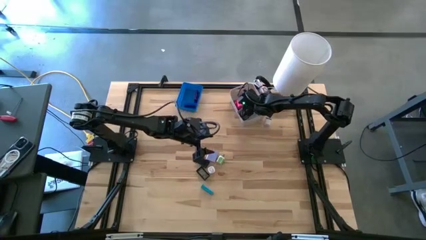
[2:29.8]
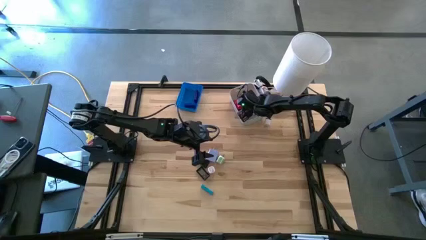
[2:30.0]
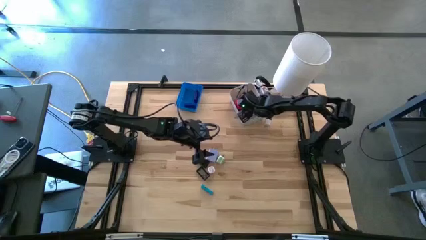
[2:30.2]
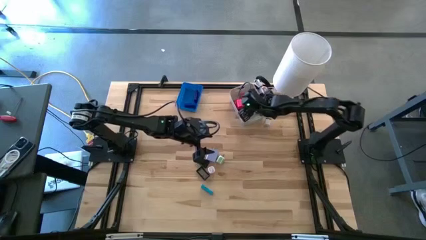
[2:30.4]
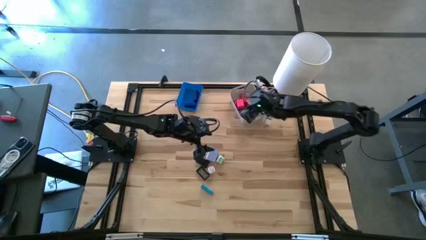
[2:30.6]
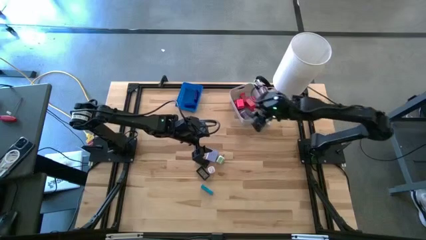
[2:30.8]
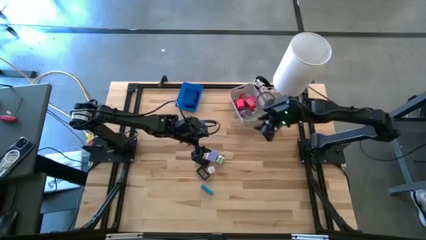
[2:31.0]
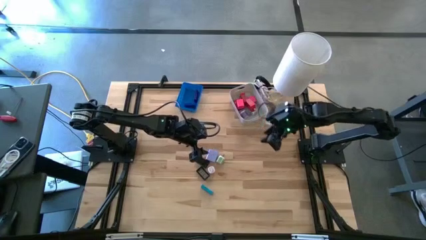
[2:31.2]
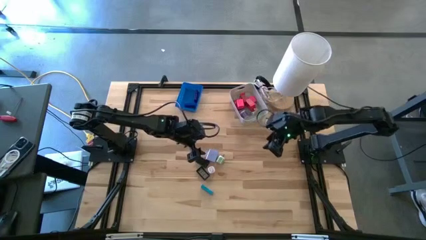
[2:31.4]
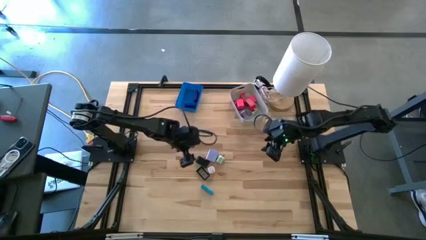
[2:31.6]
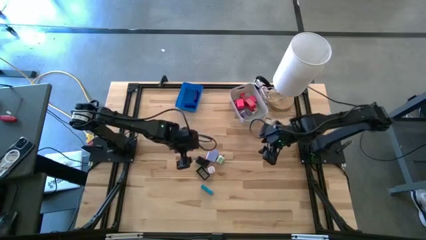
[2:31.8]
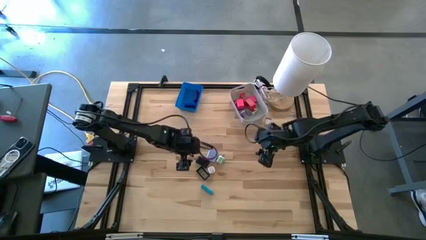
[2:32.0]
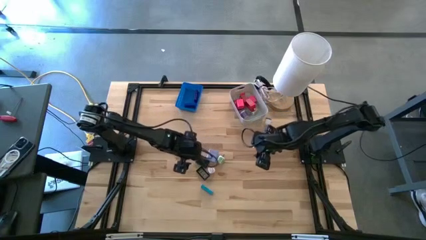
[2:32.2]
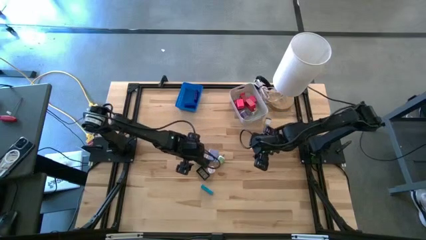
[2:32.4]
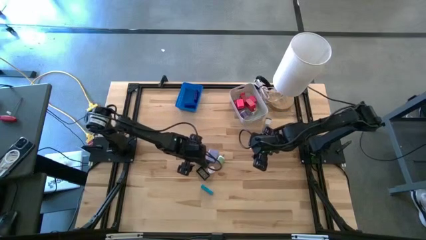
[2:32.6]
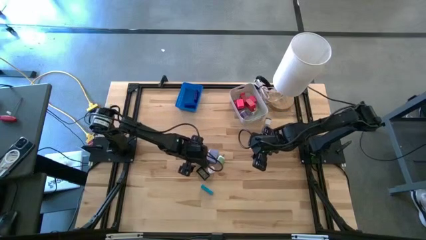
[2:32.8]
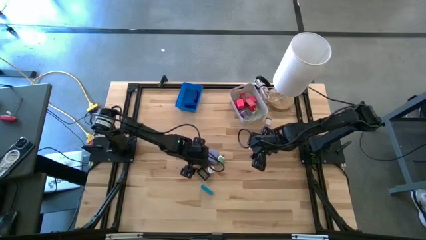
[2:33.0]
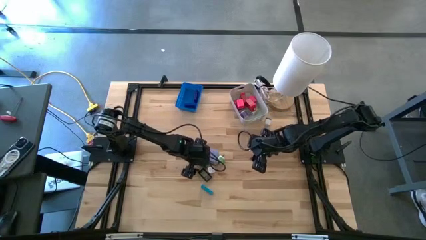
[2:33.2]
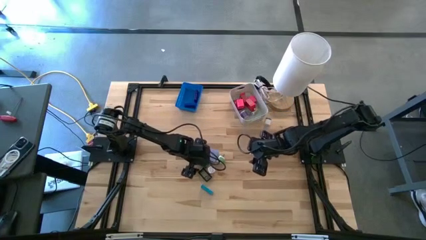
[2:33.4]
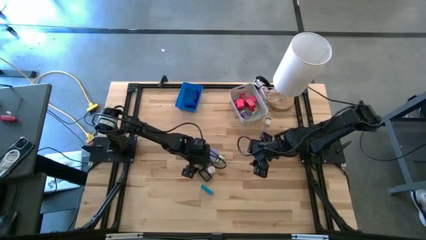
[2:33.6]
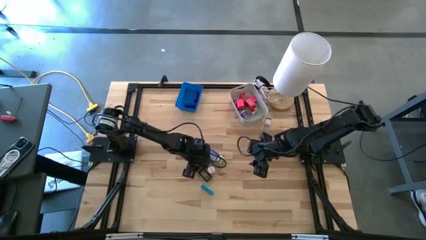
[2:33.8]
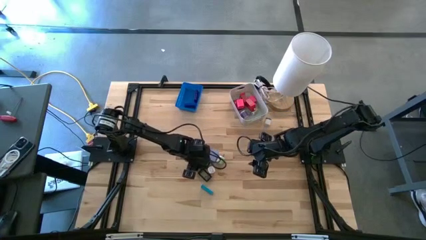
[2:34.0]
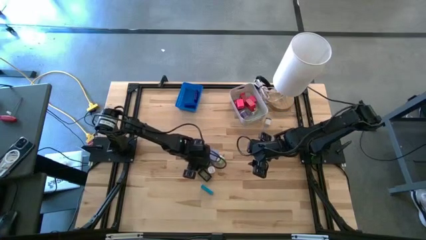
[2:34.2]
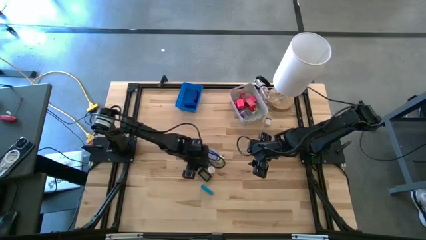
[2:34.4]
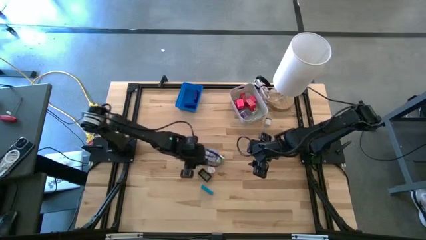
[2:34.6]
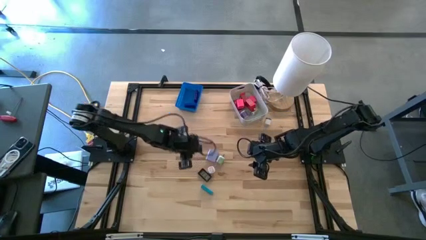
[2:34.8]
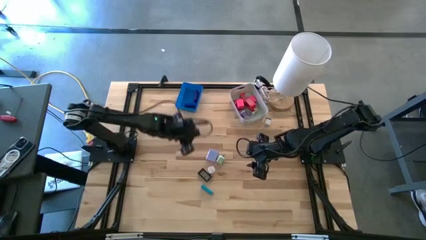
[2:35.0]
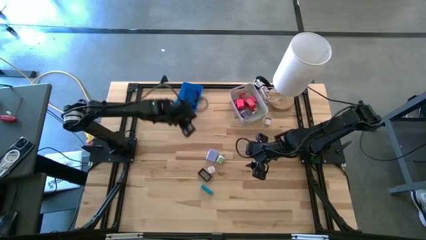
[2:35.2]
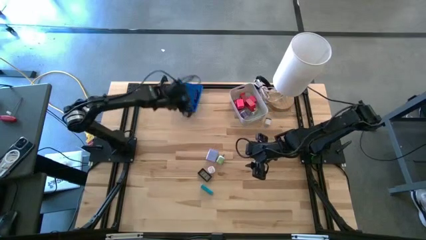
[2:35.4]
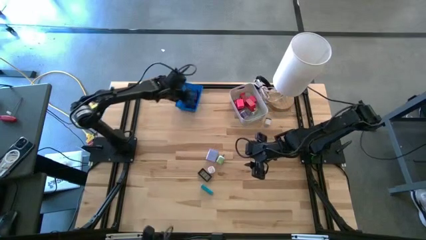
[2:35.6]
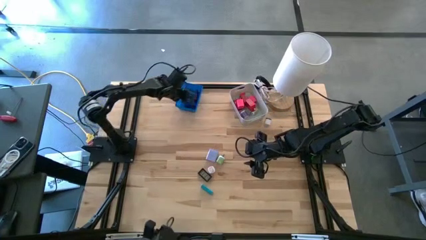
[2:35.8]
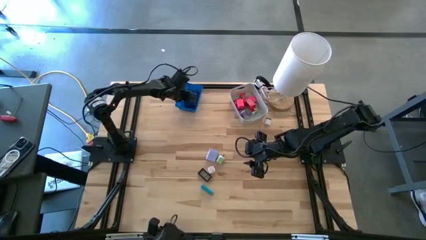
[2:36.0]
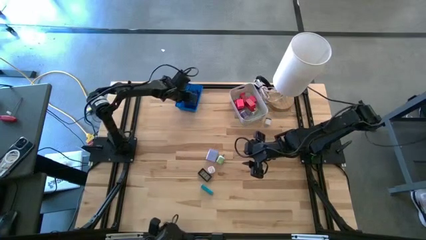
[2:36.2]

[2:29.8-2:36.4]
Task: Pick & Place Office items
Put the top black digital timer into the blue bin

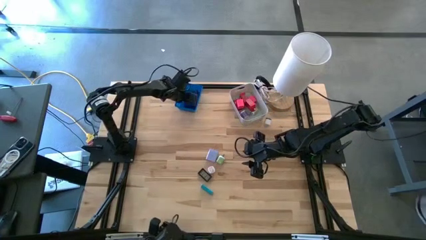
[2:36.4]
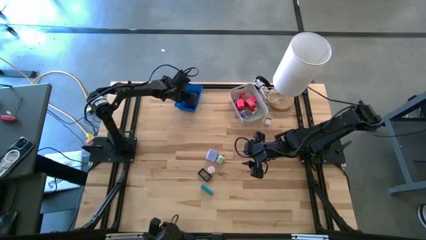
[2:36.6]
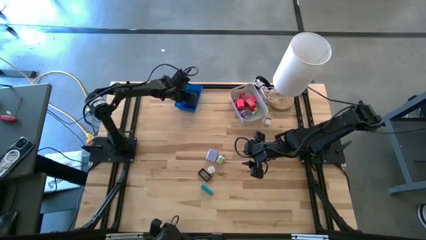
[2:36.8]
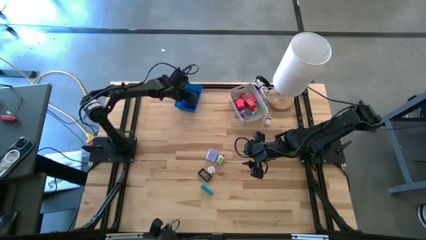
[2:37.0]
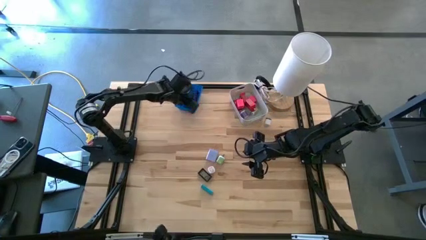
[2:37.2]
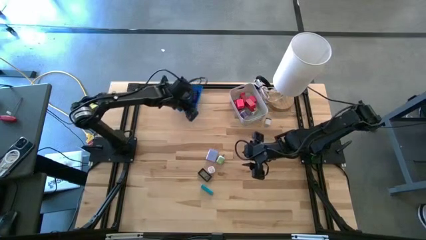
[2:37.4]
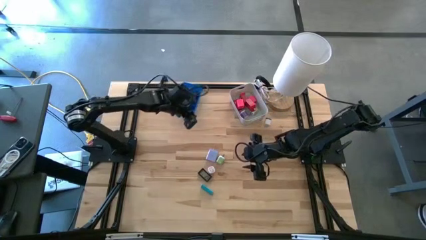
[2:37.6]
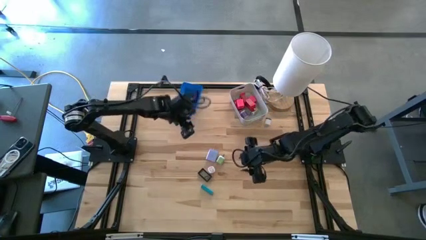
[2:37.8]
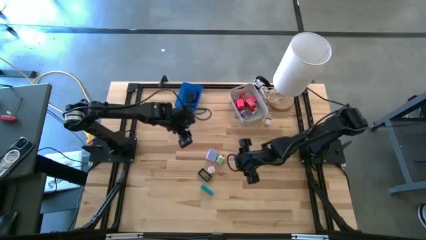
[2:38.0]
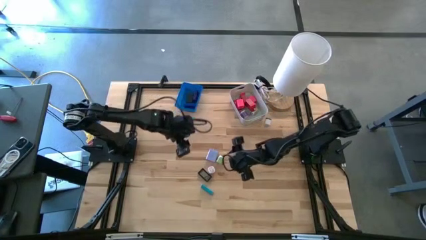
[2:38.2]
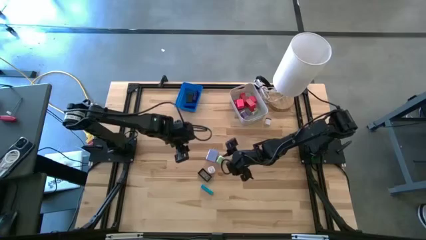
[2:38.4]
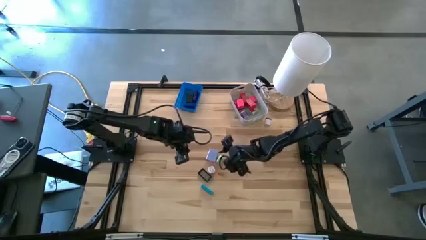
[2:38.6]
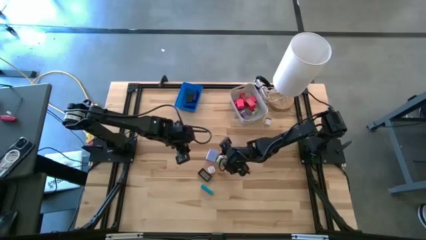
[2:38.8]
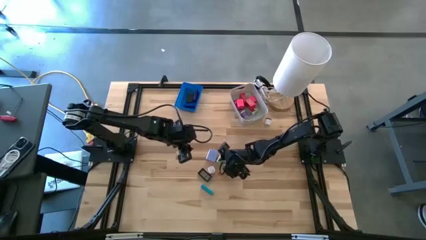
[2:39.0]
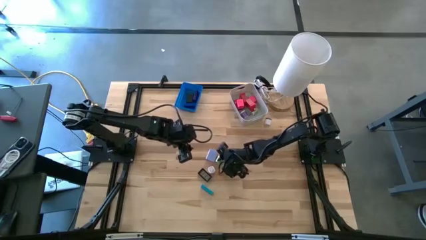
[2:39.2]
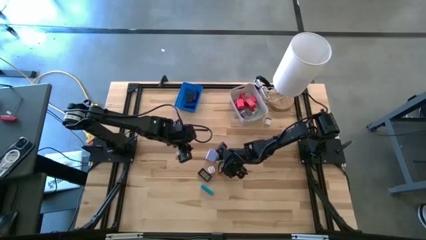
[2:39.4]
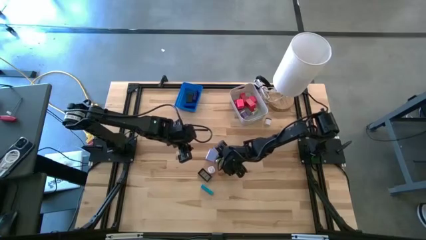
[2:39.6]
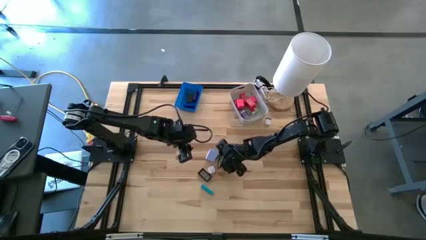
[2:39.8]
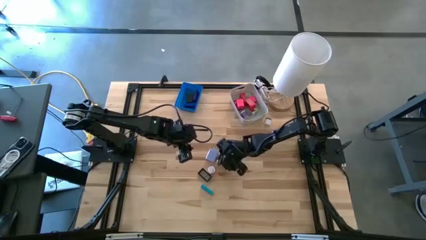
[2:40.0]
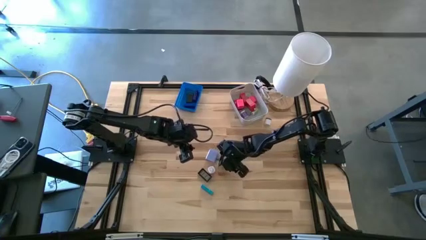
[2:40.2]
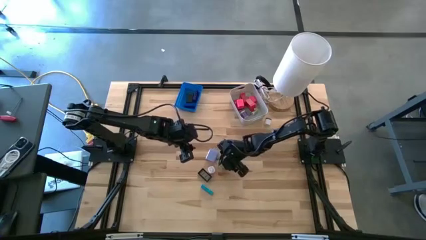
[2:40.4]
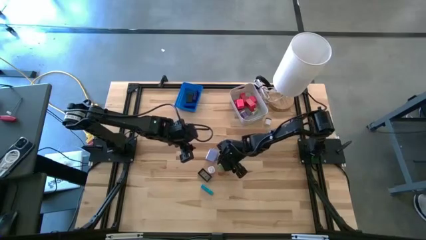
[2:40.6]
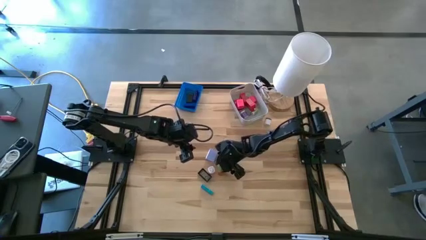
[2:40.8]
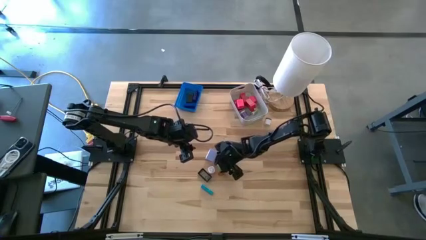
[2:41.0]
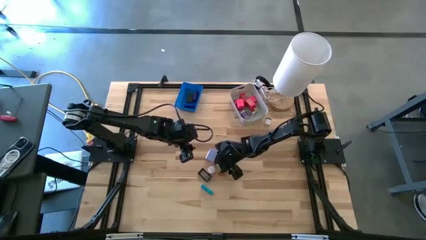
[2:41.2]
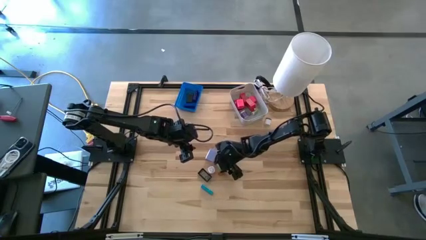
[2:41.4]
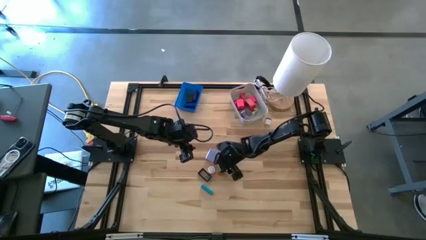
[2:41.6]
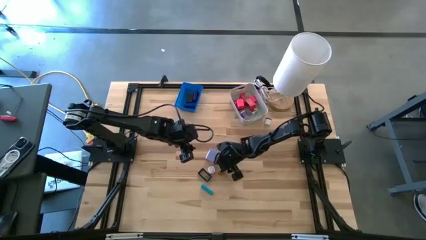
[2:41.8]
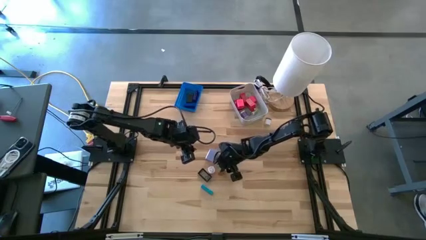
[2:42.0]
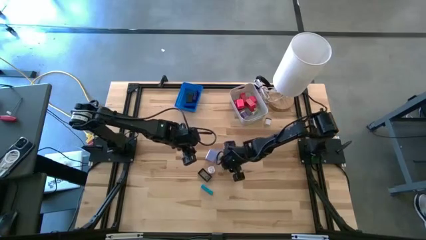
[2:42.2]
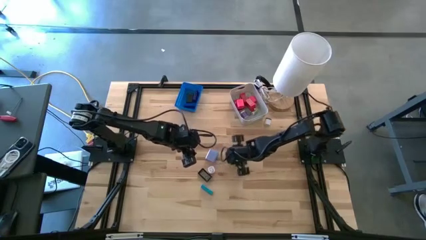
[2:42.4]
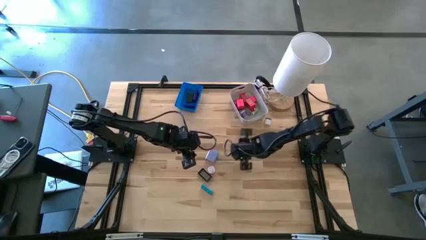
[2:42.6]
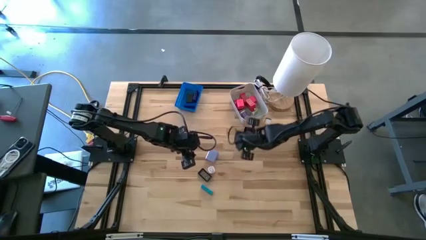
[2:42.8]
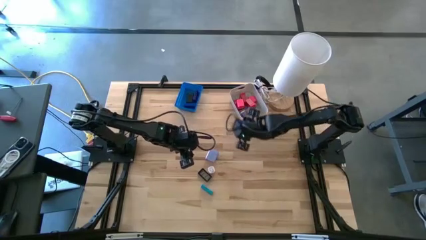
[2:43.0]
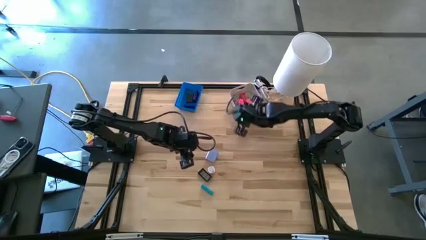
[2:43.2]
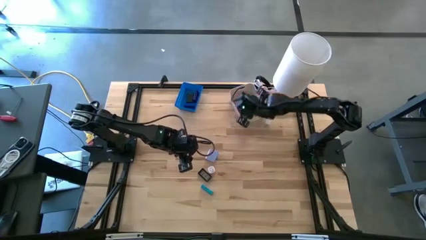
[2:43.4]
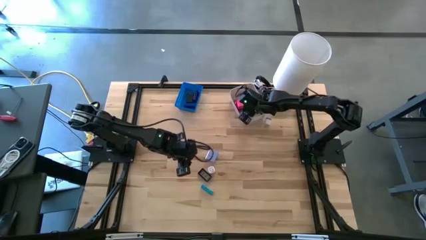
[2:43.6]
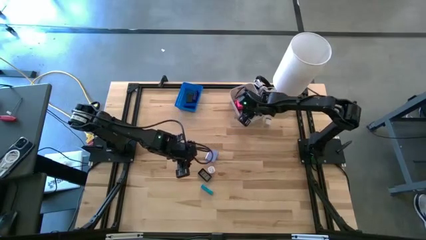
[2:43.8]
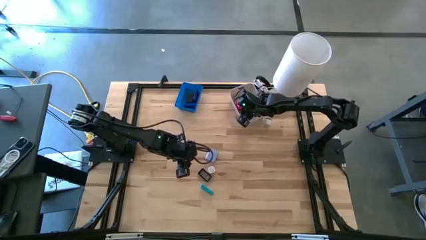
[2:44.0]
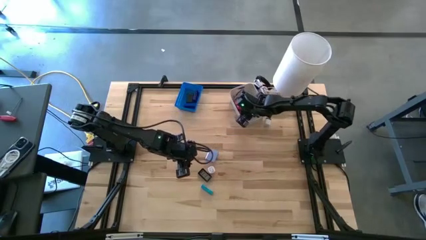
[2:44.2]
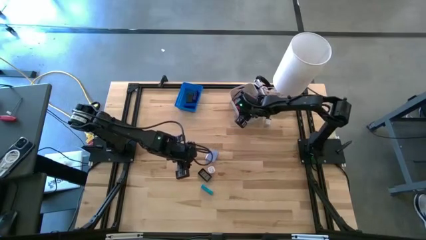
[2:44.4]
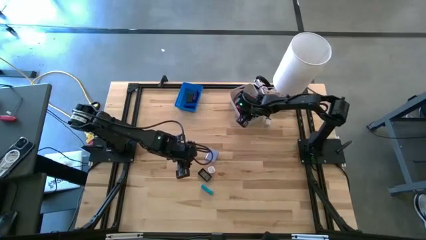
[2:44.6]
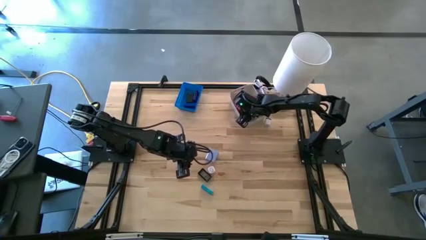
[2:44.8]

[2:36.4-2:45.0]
Put the green charger adapter into the white bin
